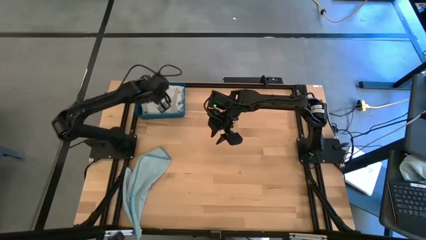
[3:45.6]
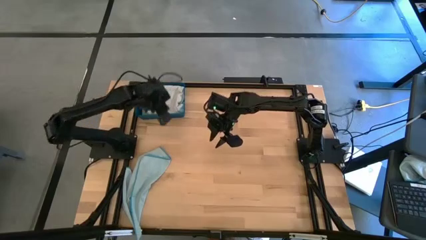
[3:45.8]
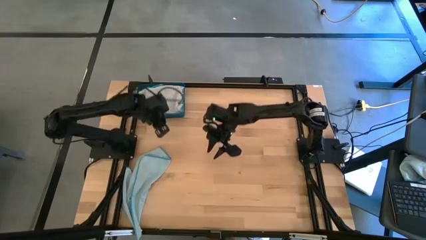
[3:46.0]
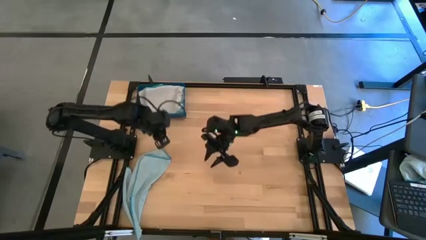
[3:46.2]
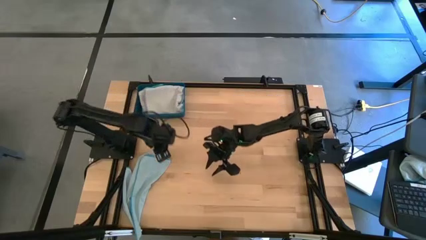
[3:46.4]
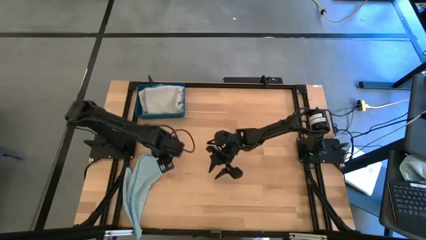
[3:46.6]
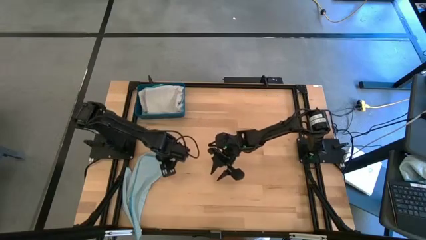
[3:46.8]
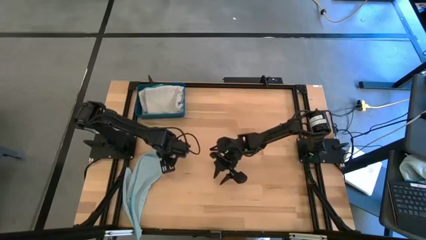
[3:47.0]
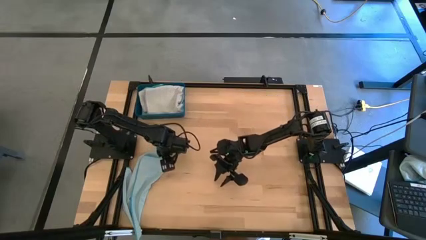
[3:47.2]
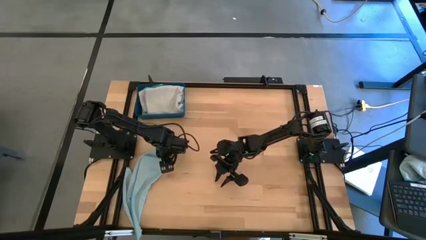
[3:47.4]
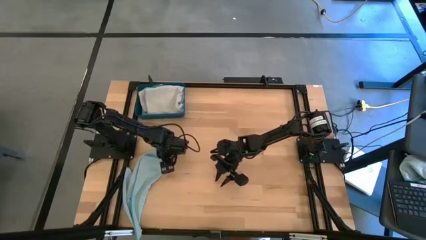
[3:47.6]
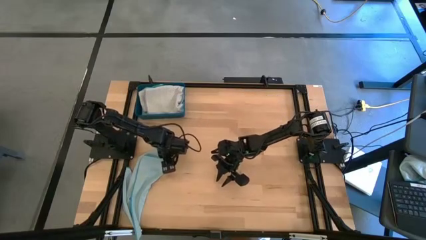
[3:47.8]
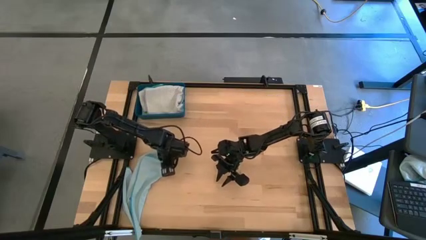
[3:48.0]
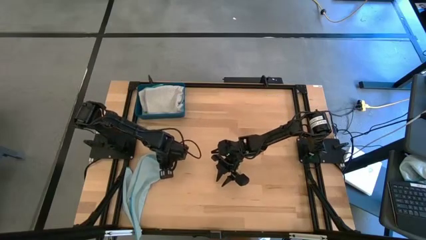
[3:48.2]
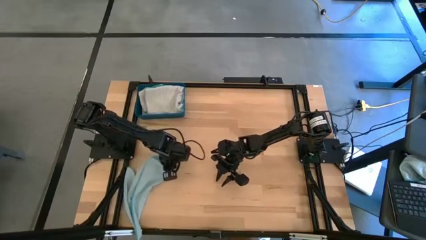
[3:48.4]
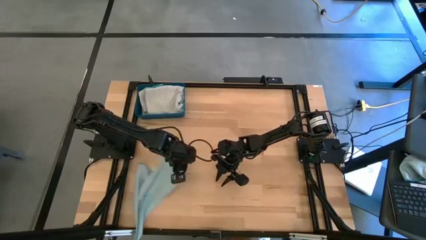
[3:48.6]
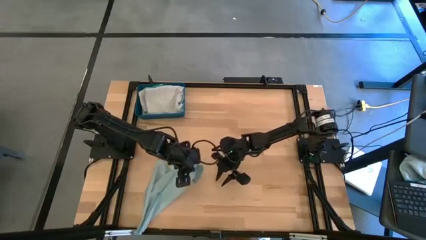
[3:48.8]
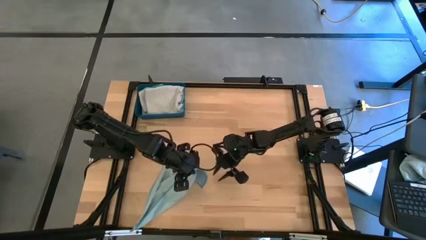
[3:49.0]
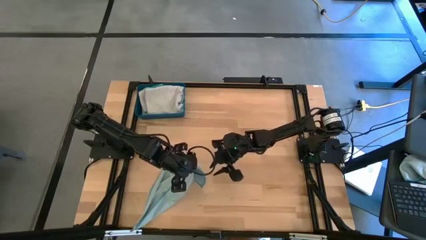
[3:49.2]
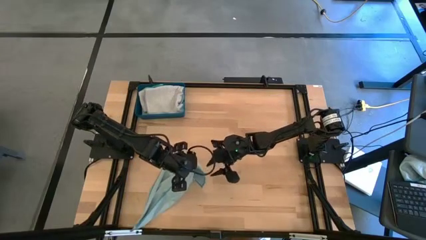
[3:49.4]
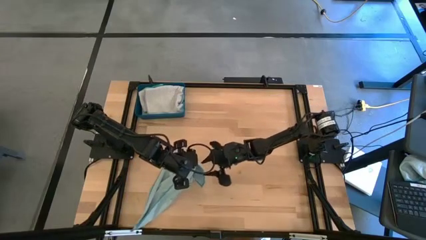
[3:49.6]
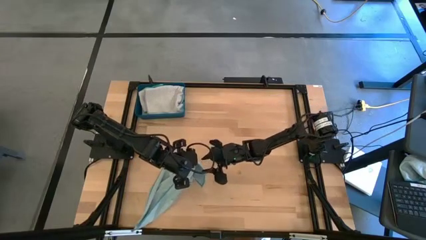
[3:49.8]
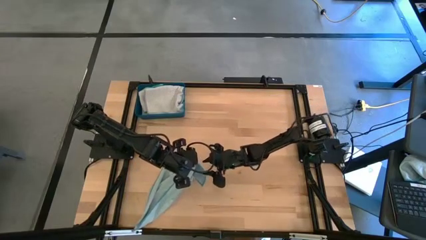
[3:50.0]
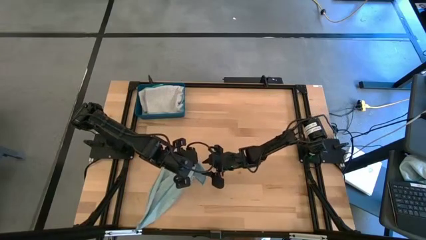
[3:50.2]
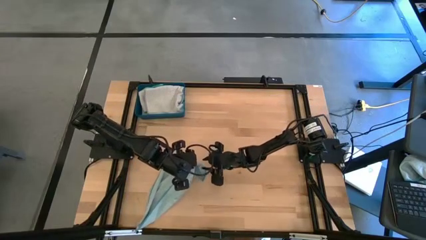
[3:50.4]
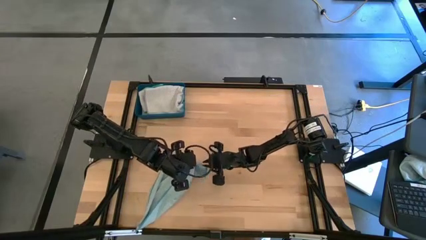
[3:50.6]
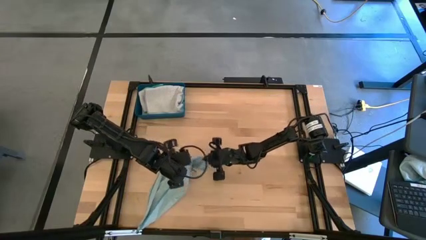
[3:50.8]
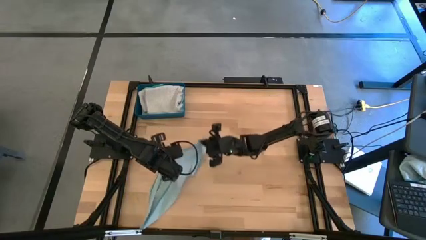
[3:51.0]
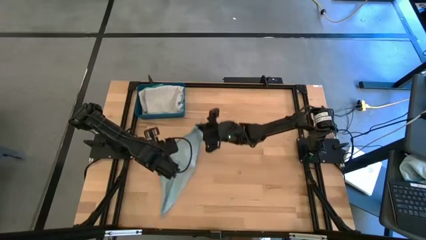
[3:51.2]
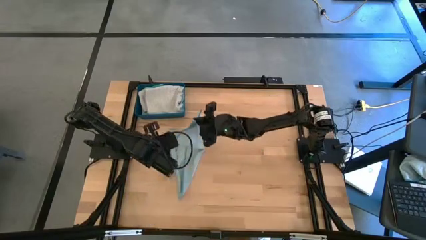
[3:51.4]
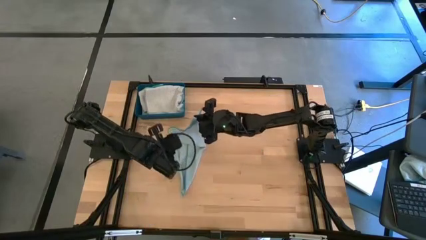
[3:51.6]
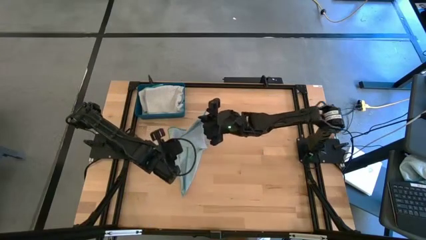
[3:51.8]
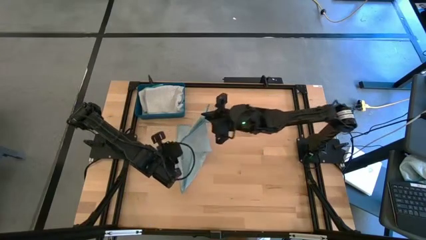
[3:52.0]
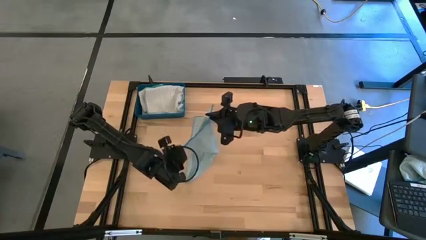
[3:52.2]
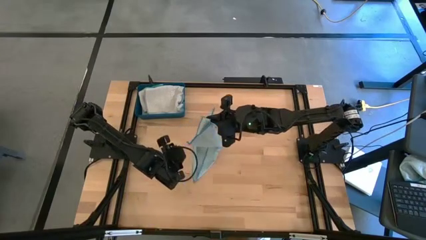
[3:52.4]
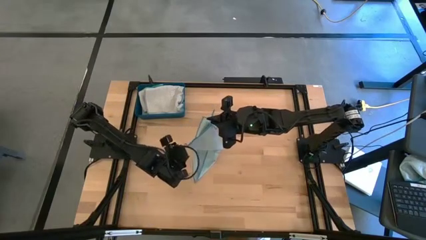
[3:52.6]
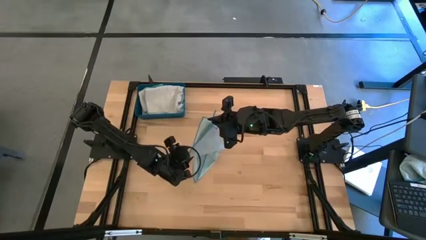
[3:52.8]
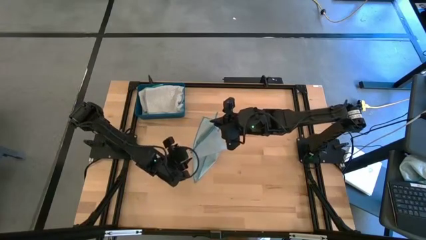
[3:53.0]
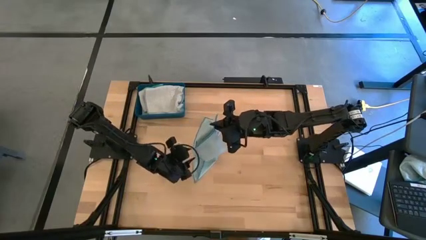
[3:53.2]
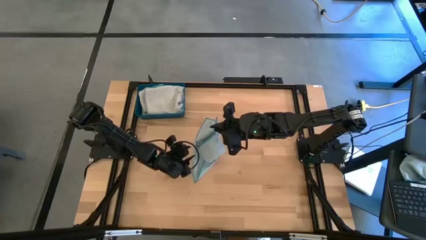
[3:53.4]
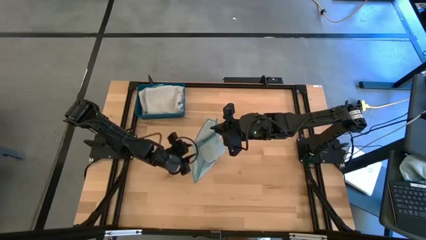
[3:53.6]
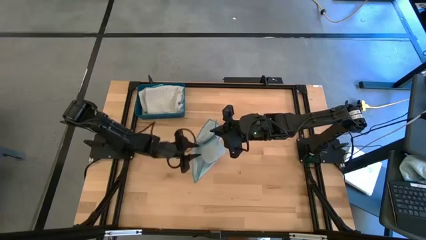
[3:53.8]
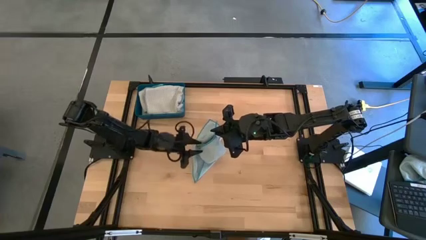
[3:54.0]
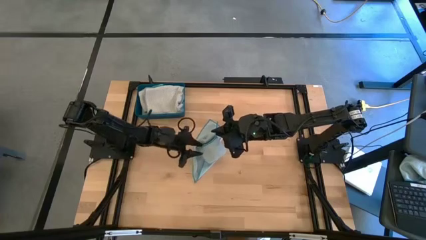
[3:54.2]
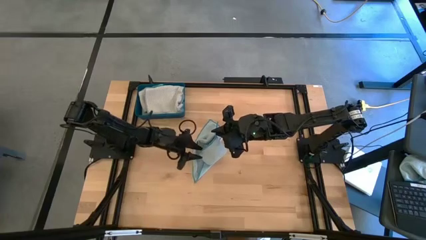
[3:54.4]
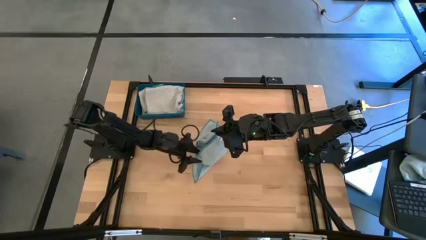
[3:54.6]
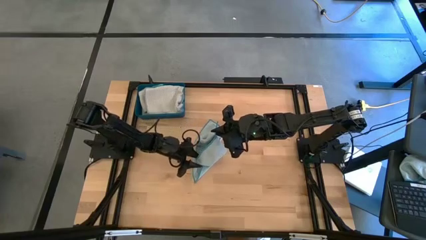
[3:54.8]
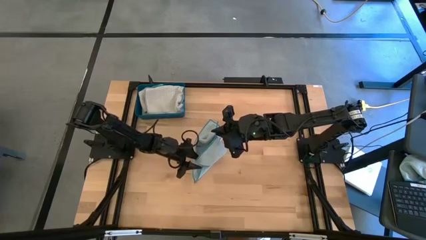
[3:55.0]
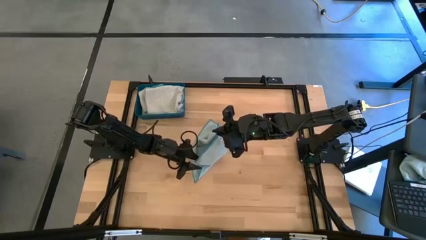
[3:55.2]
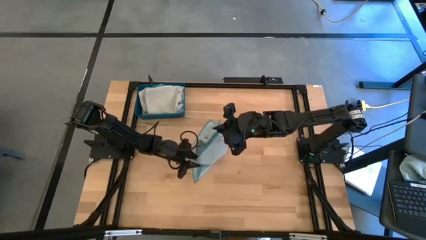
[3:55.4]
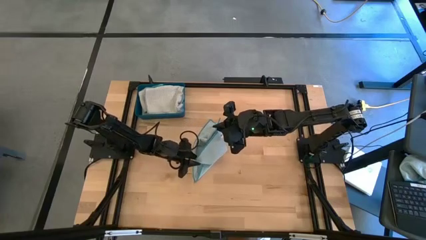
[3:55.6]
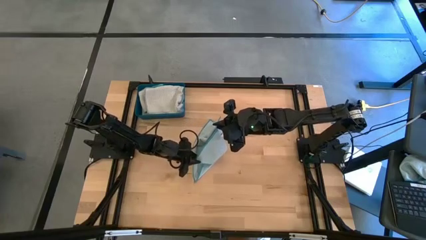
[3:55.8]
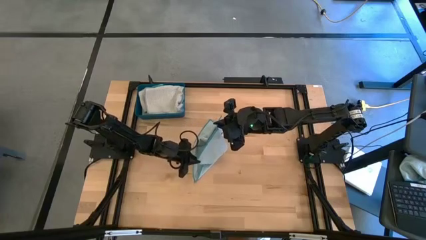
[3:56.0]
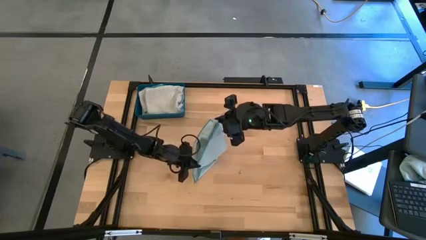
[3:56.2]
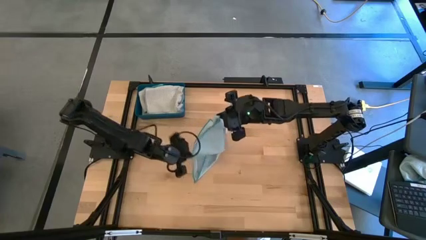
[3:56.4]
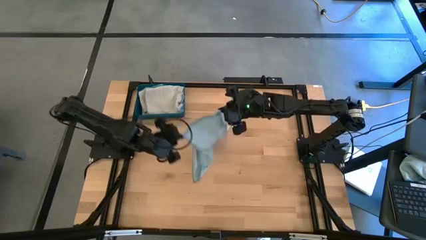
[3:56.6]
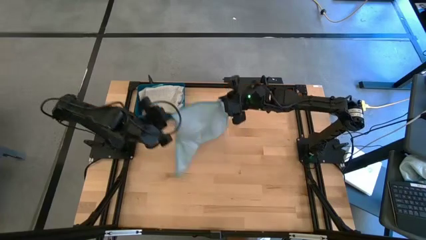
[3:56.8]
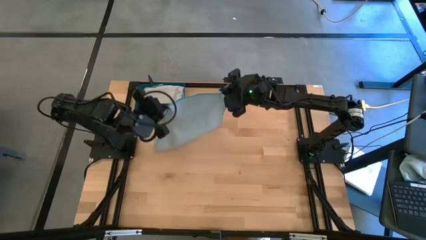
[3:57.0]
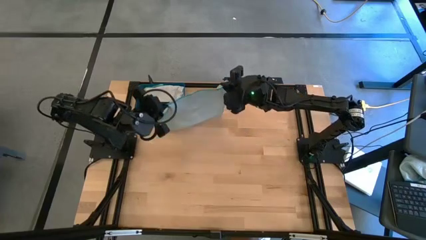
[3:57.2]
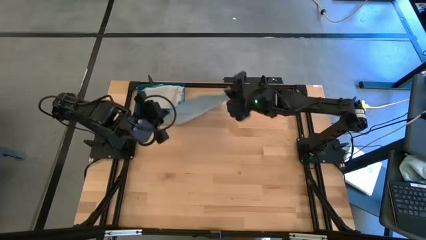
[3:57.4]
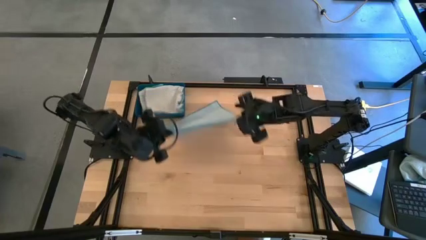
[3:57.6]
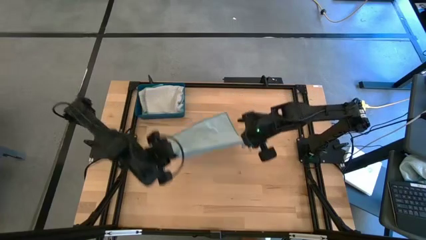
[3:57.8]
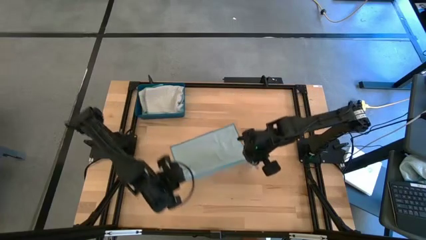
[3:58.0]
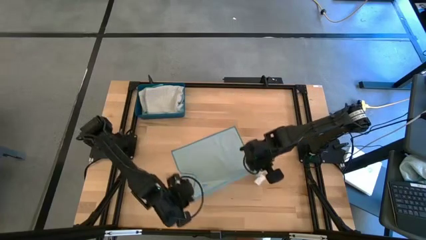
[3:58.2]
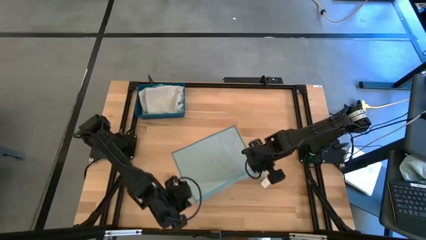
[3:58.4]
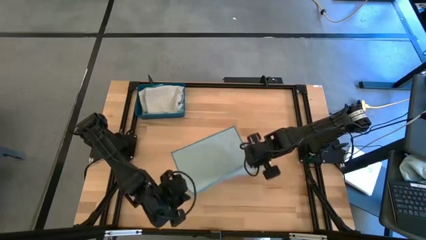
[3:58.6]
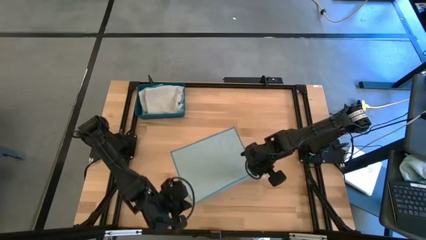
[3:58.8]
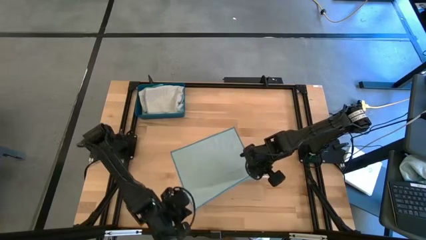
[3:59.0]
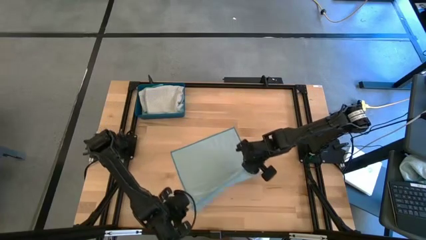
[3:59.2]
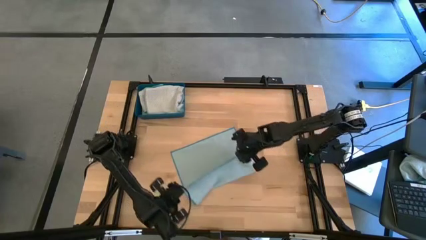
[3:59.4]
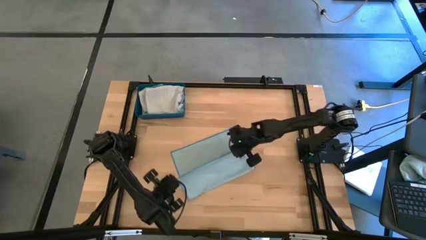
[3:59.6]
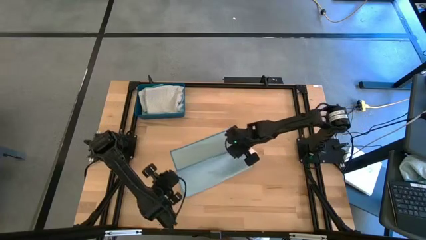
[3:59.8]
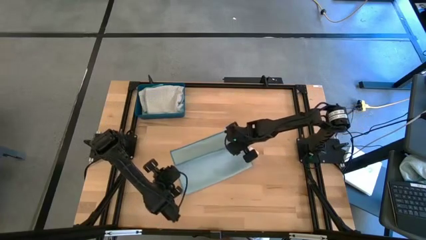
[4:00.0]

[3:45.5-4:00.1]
Task: Fold microfiber towels
Fold the light blue towel
